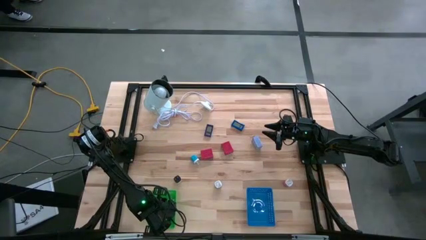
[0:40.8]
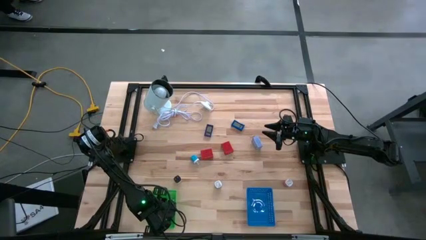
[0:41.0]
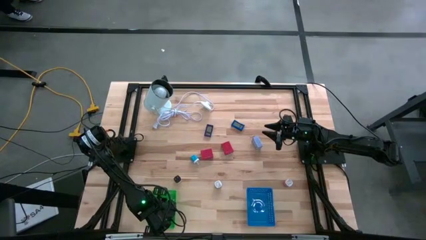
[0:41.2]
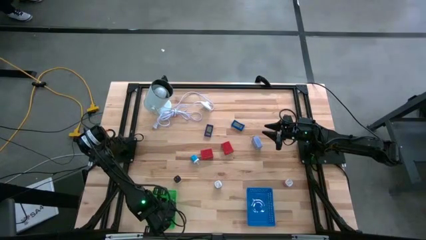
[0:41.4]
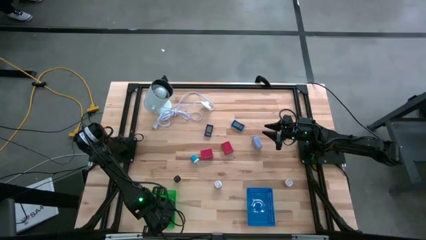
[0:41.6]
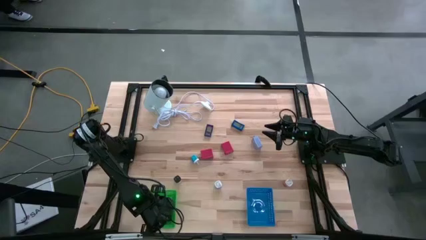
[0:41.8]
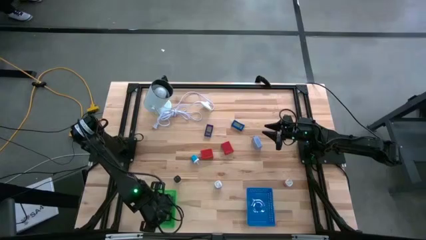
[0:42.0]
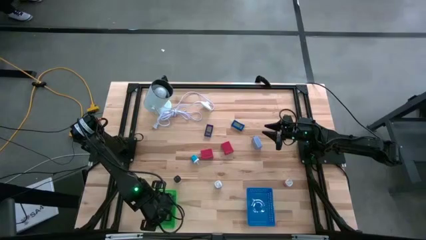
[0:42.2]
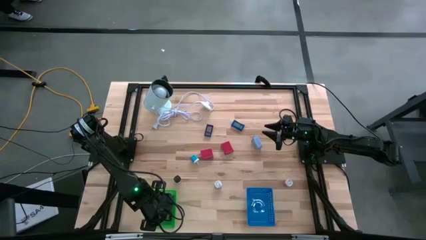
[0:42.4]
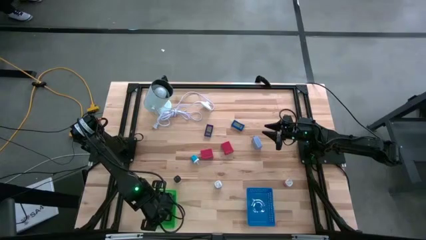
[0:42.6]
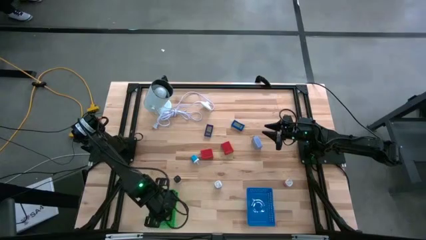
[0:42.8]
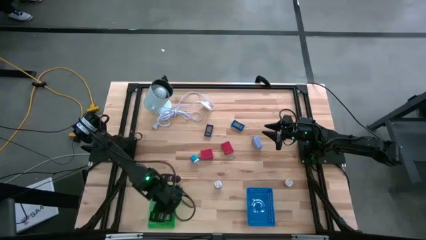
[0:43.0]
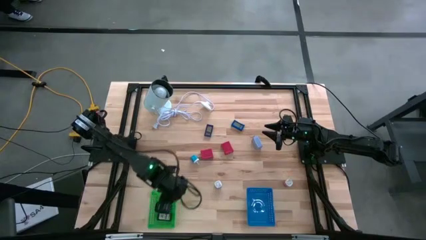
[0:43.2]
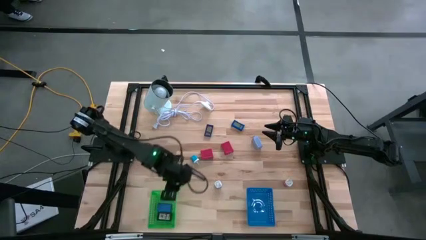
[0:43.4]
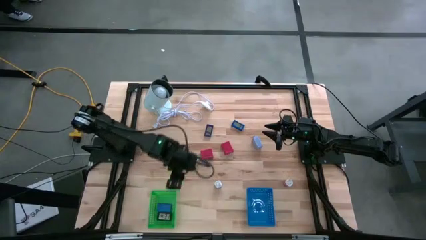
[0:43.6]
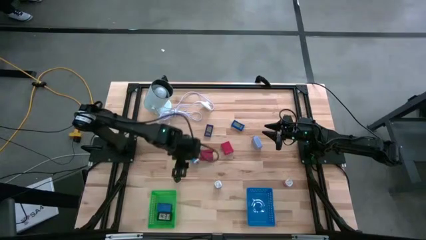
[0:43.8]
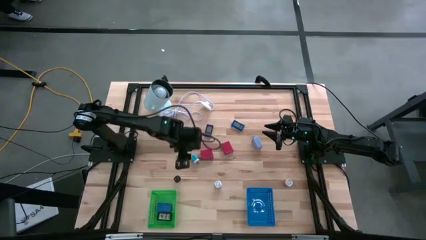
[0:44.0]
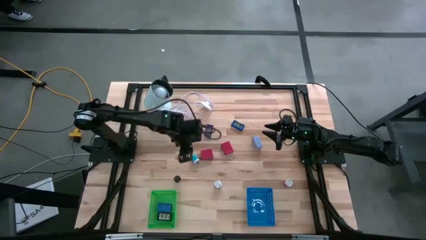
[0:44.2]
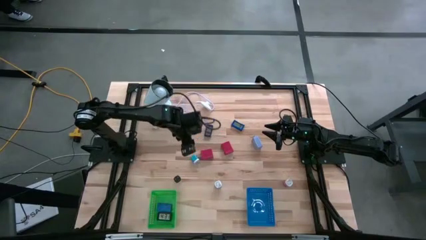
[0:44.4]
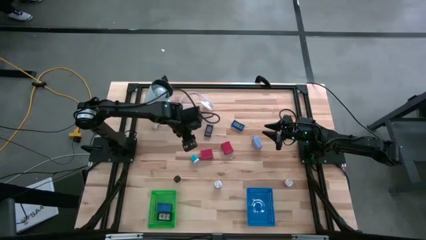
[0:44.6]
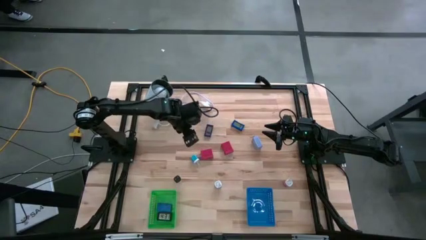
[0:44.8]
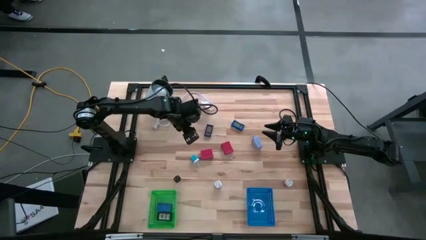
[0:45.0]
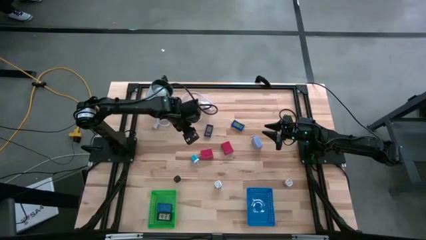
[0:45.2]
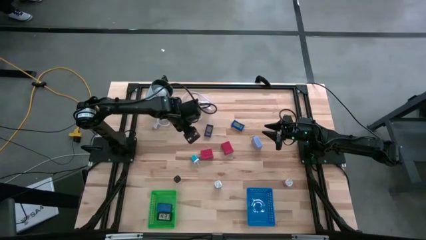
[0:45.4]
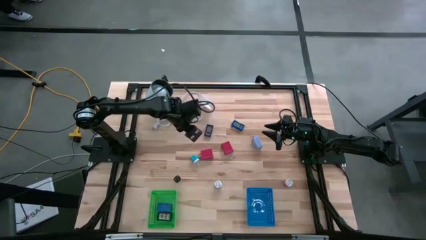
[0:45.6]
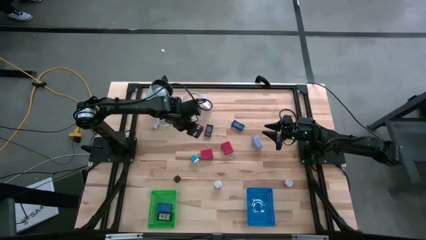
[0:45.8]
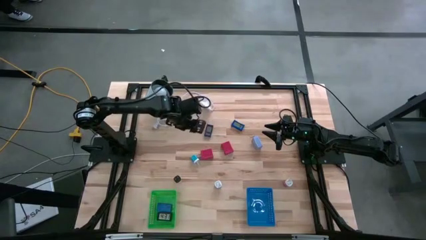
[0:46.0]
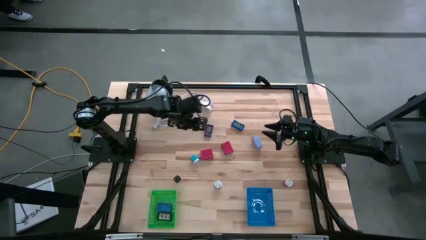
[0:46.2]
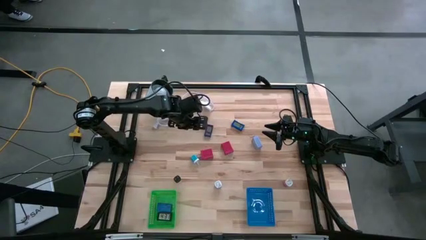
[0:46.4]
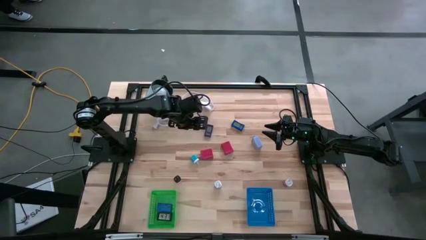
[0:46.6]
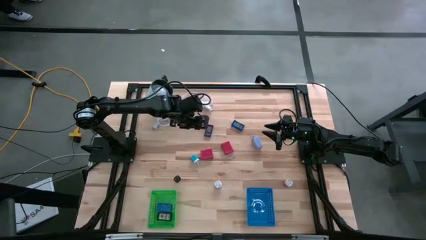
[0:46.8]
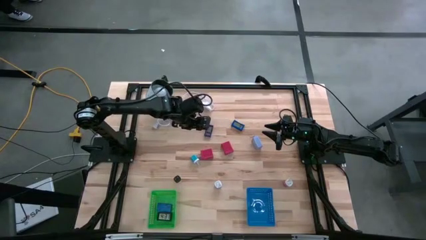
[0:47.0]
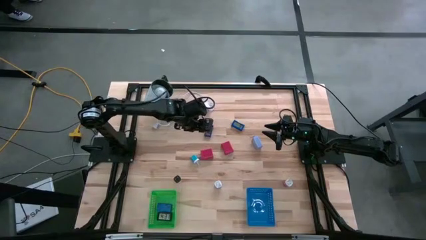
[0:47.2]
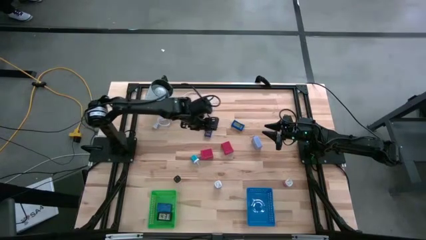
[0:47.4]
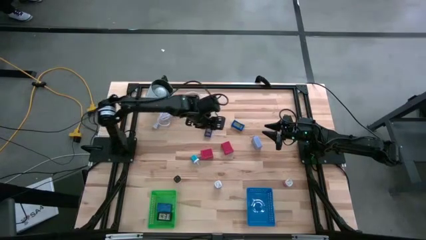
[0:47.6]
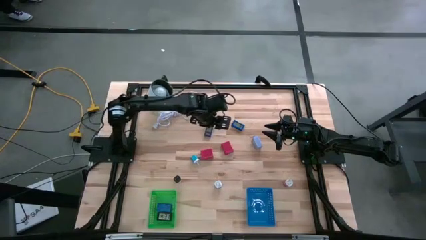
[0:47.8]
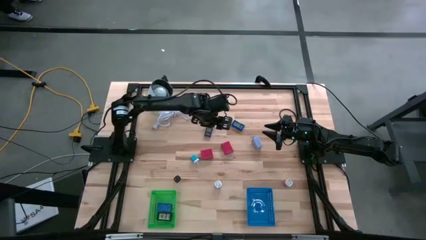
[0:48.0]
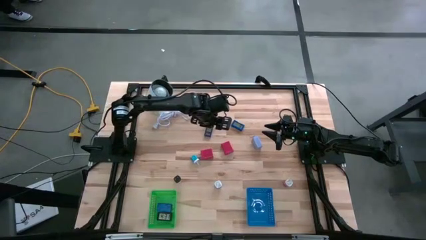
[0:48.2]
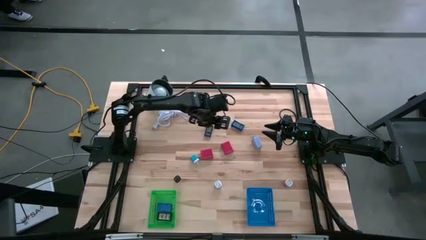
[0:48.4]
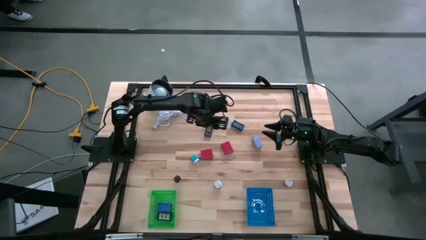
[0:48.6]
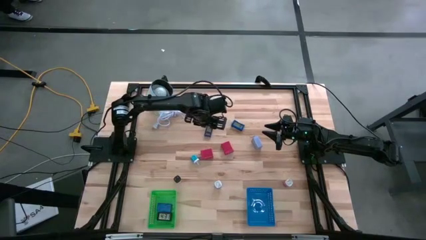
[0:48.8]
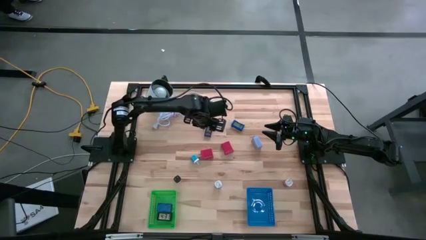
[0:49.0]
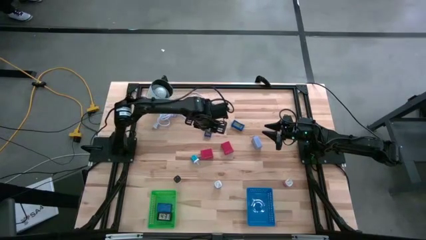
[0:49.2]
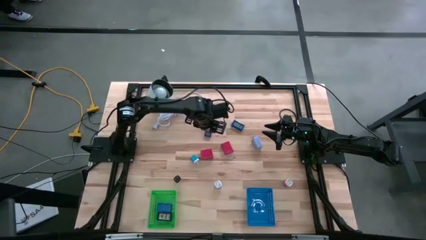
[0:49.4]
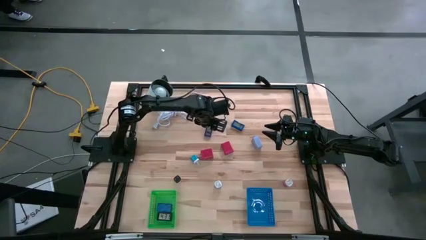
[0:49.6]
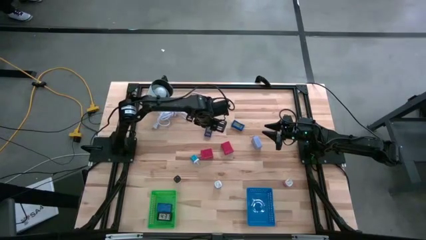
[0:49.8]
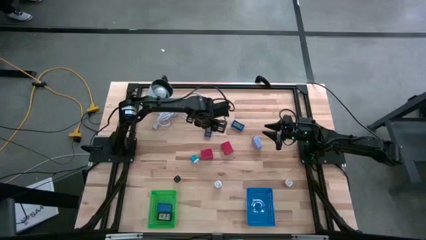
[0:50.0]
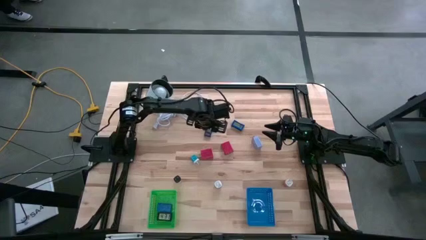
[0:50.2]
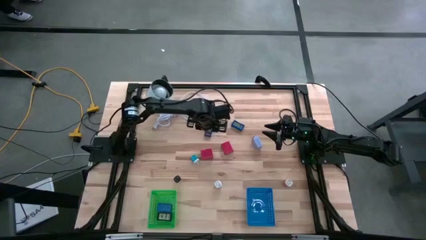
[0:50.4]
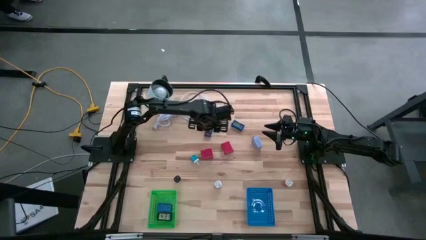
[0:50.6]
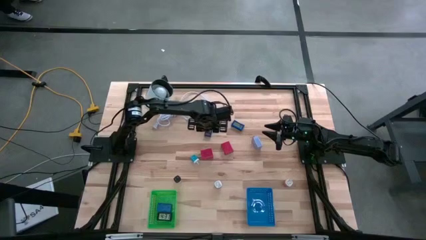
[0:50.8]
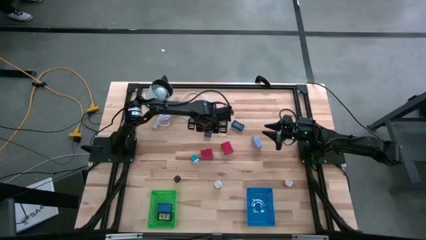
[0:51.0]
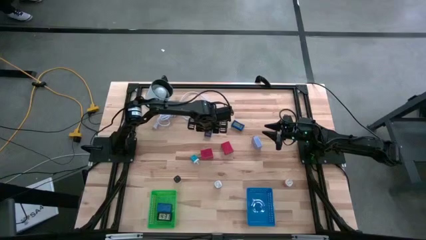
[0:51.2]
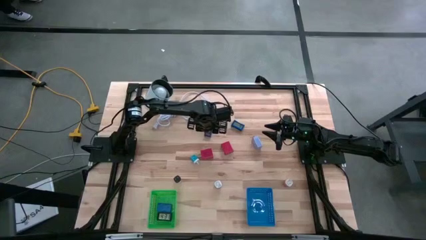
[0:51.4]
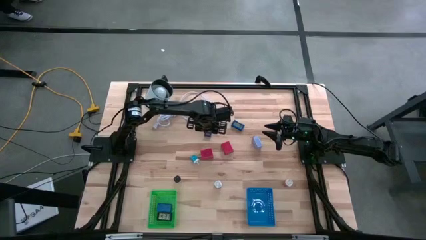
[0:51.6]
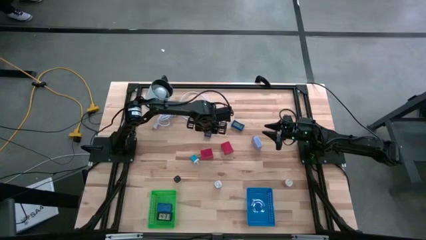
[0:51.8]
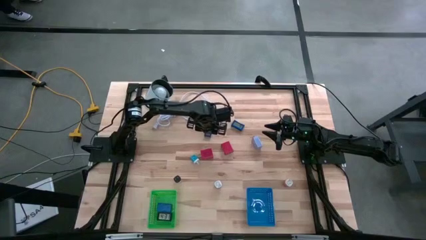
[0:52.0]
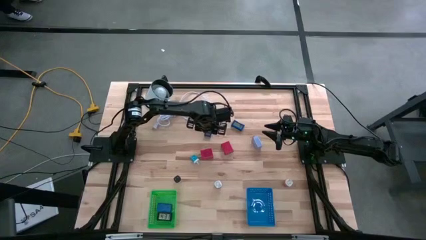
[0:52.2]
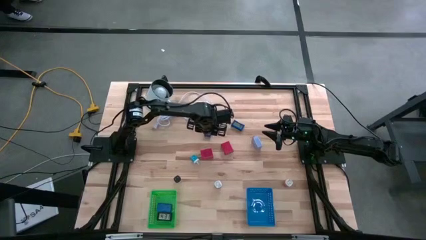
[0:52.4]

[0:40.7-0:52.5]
Task: Pick & Place Office items
Put the left blue digital clock into the green bin

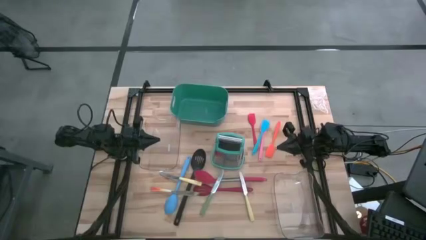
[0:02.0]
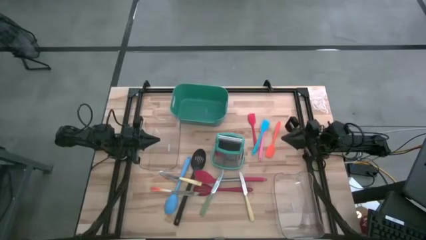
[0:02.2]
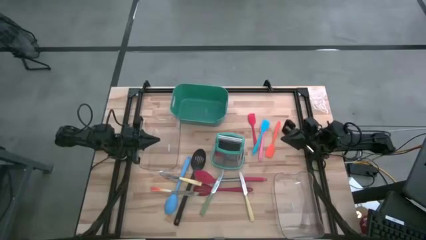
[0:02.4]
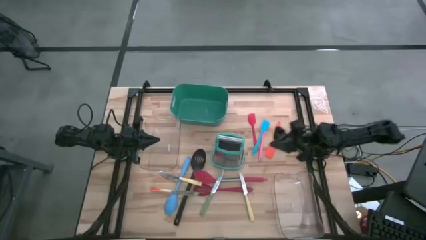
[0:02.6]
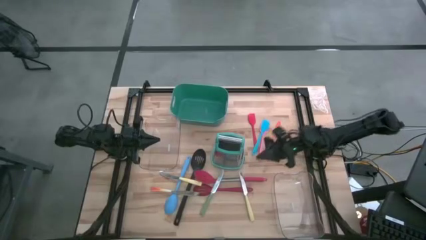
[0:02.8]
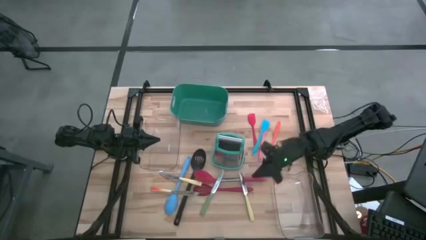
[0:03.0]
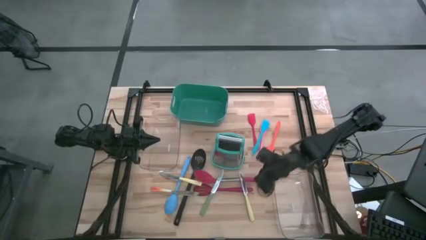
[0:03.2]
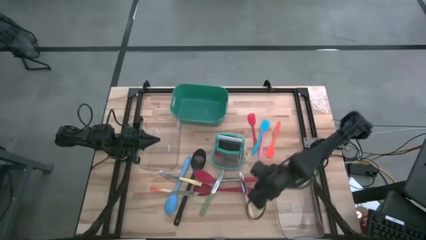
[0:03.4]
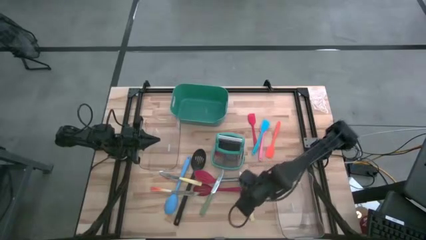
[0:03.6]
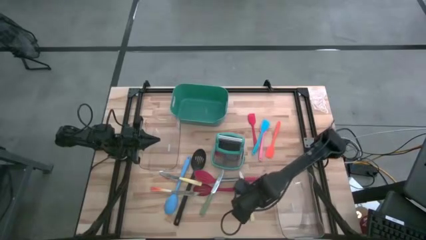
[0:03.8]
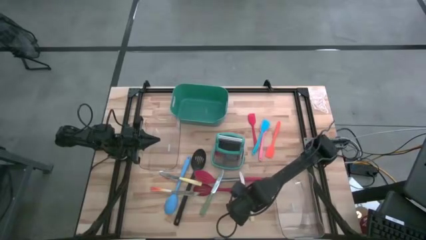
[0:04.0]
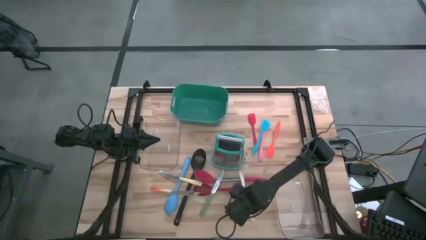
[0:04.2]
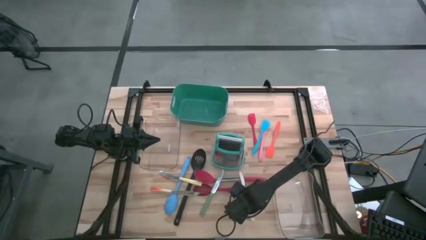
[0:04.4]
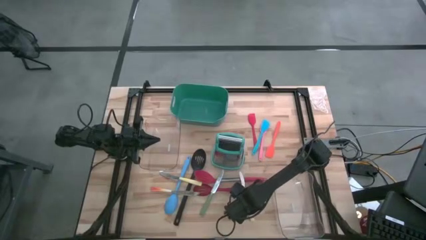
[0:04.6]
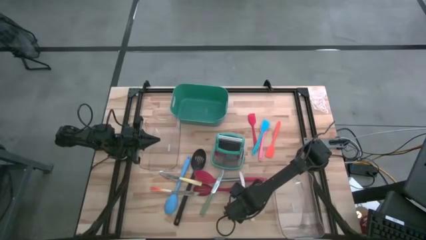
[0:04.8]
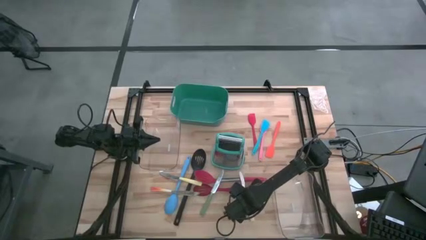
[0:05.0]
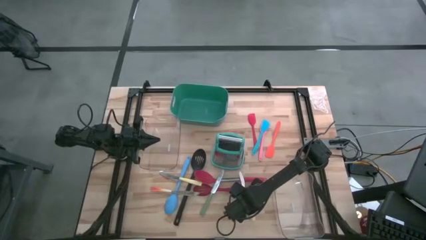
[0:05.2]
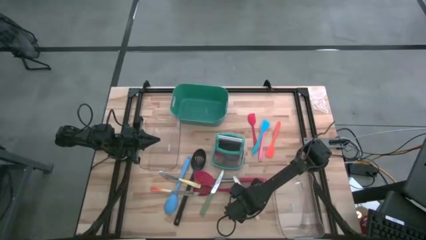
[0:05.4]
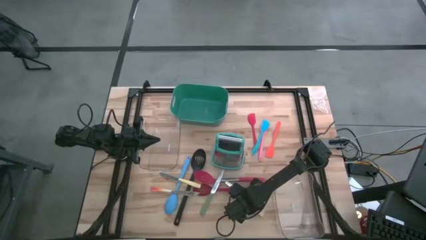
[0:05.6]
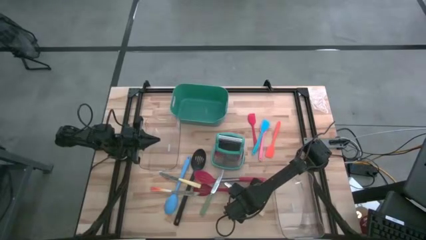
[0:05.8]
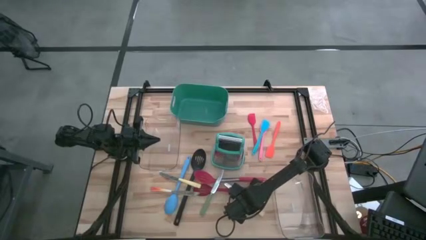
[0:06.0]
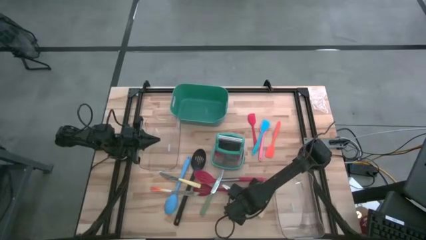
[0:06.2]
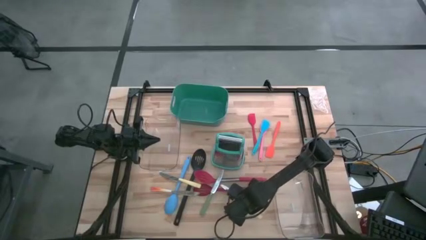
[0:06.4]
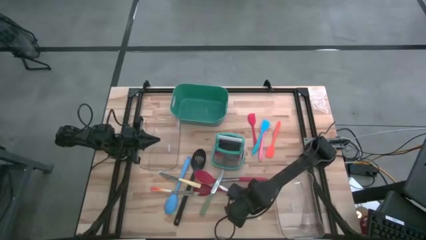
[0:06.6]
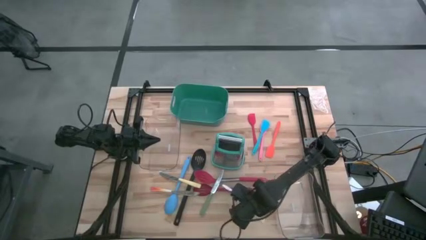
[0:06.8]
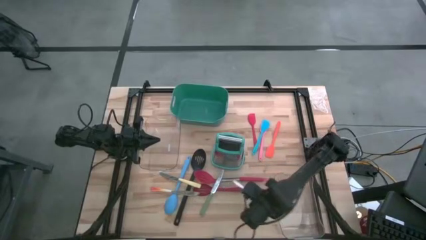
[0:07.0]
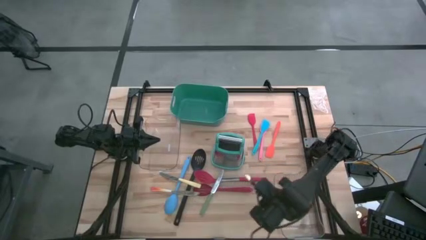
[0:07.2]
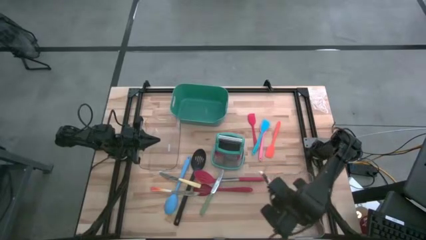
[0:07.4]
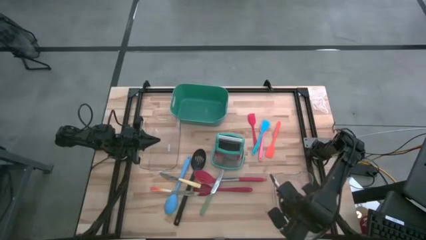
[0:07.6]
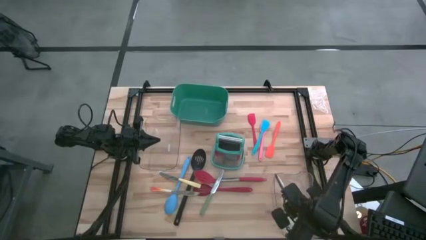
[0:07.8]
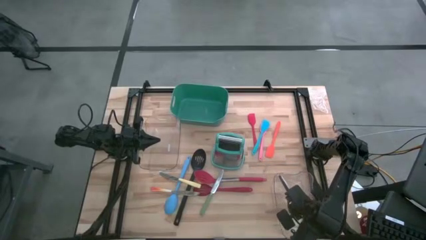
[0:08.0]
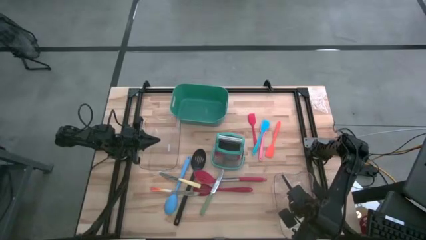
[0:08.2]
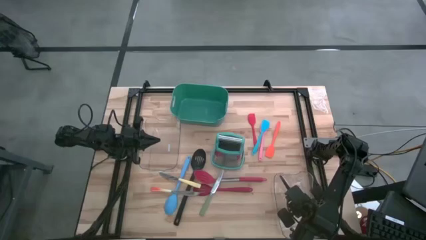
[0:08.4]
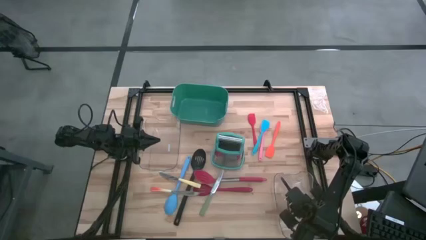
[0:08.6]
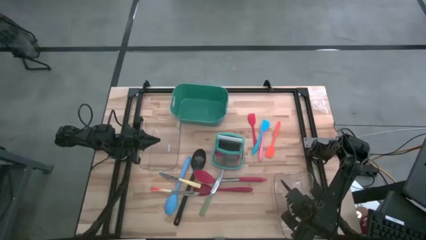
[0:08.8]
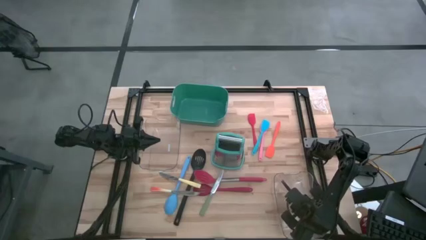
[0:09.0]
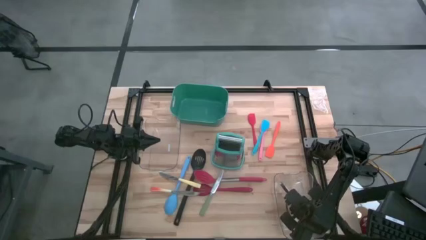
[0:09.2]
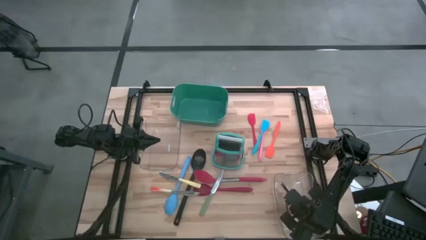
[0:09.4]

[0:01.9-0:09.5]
Task: Pick & Place Kitchen Items
Put the yellow table knife into the bottom transparent bin
